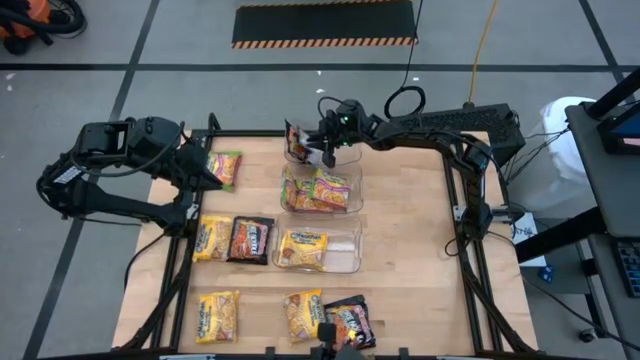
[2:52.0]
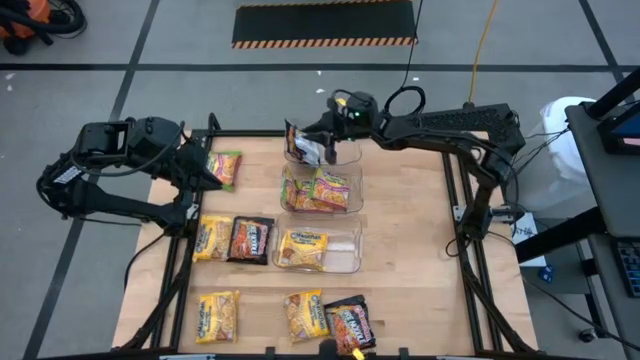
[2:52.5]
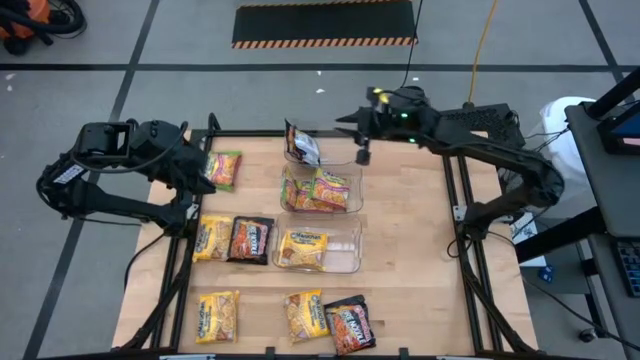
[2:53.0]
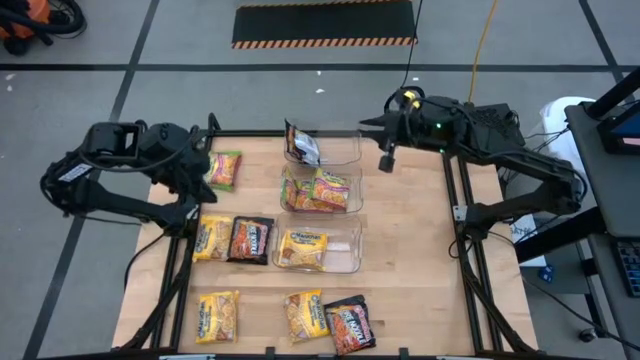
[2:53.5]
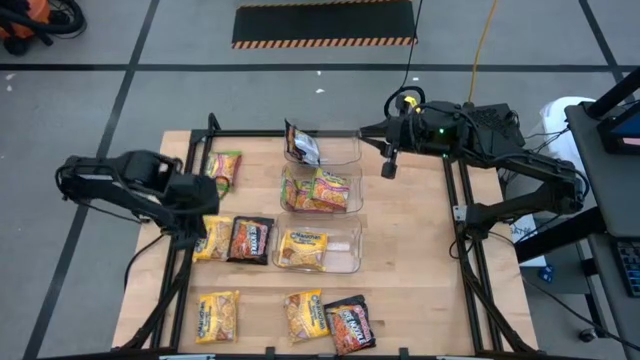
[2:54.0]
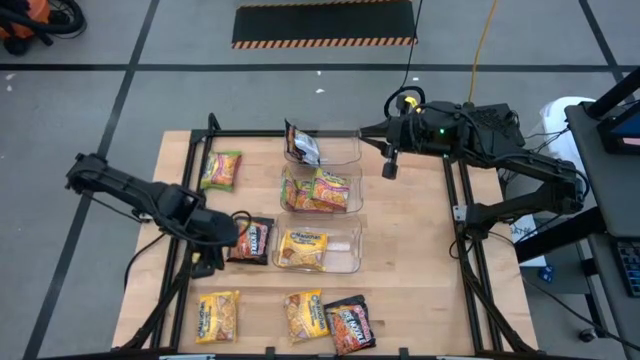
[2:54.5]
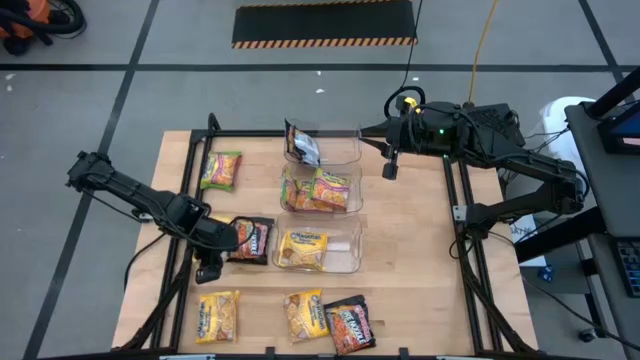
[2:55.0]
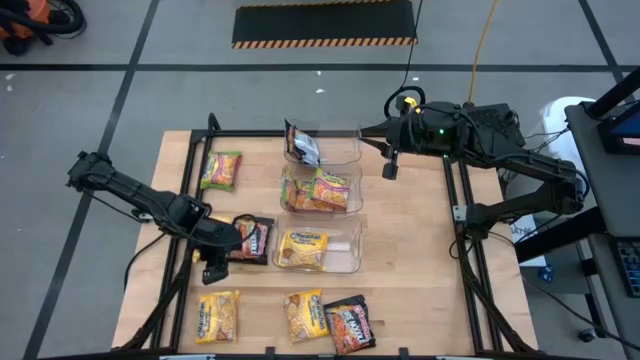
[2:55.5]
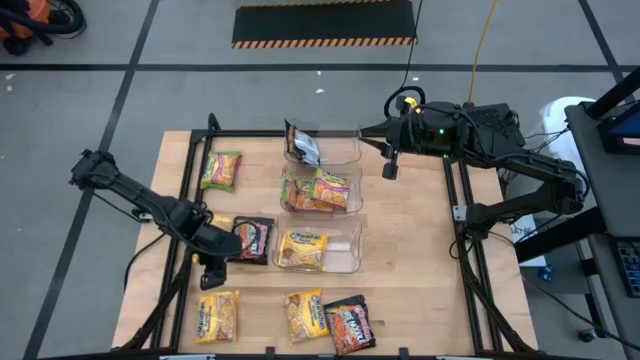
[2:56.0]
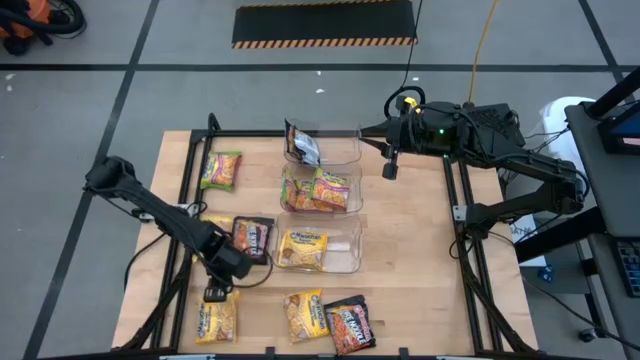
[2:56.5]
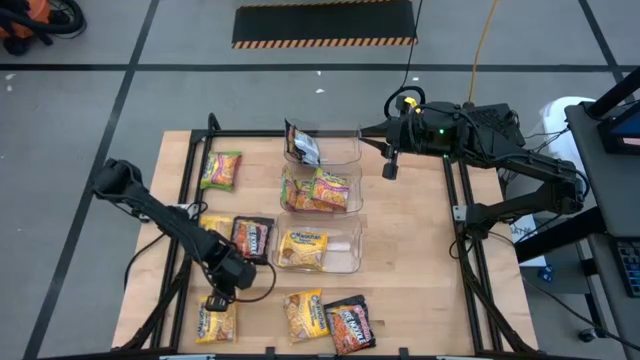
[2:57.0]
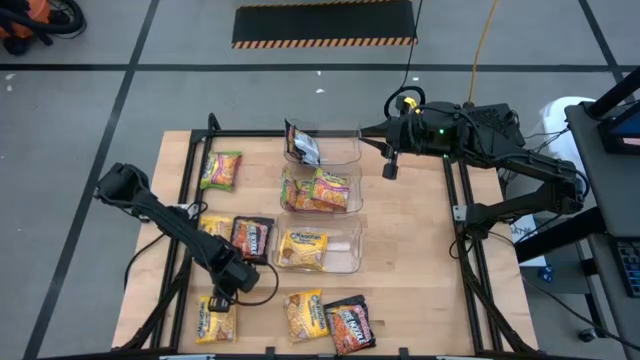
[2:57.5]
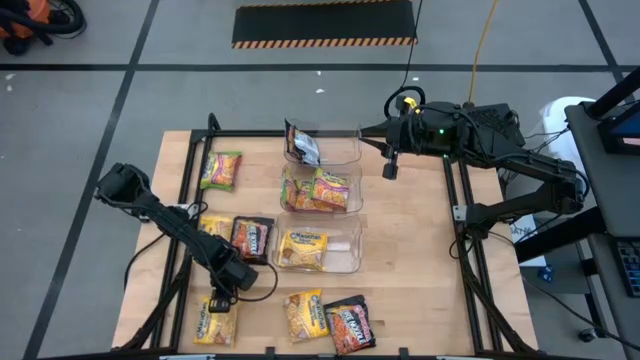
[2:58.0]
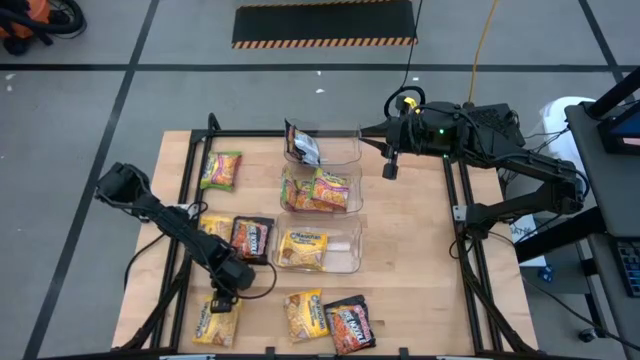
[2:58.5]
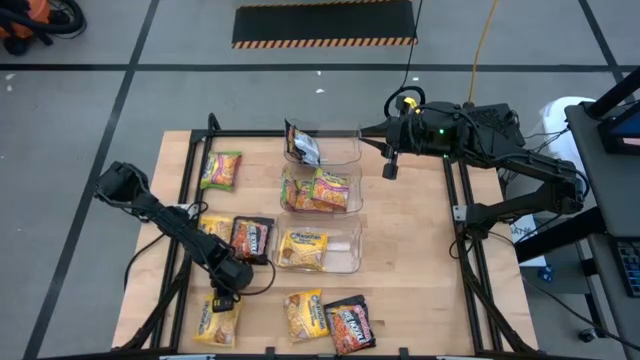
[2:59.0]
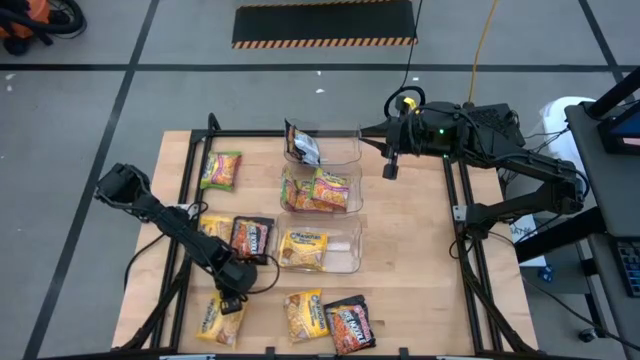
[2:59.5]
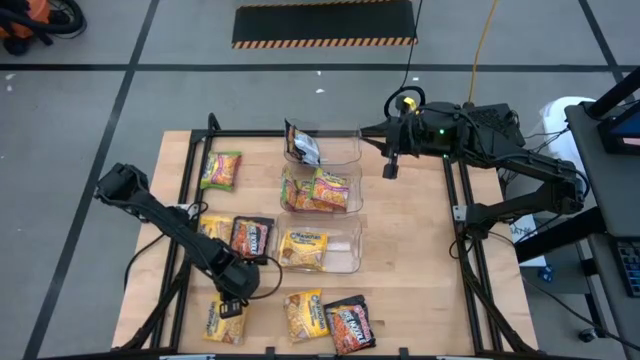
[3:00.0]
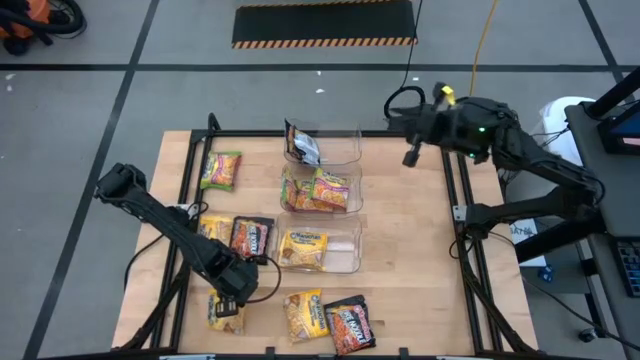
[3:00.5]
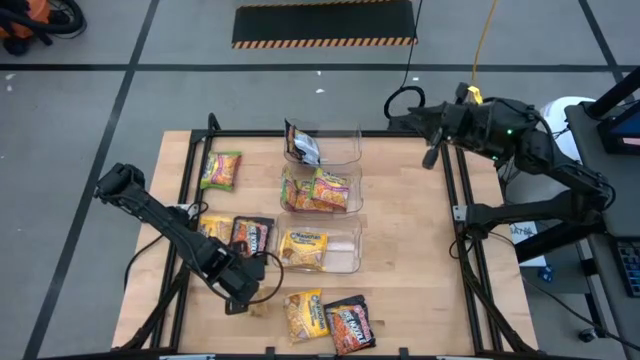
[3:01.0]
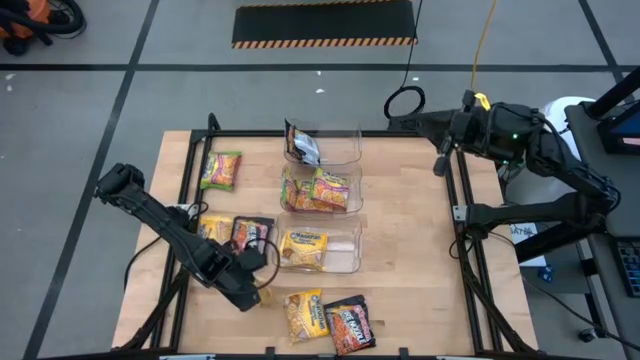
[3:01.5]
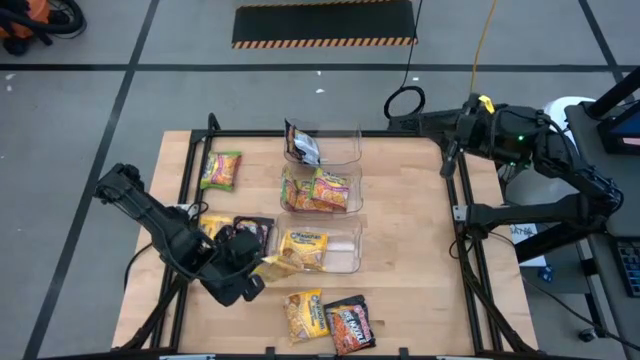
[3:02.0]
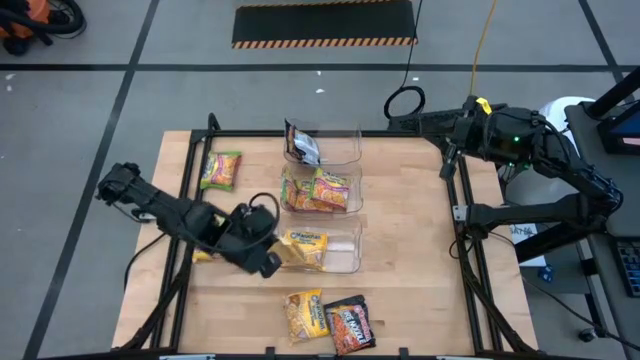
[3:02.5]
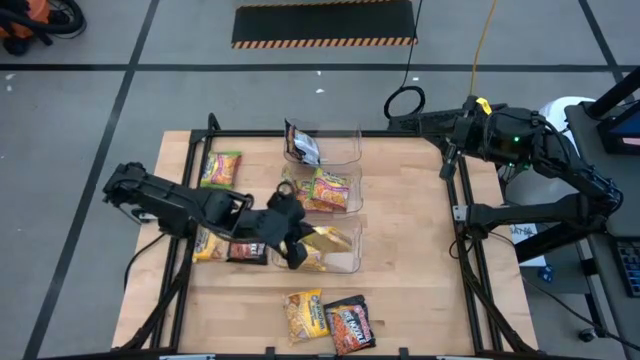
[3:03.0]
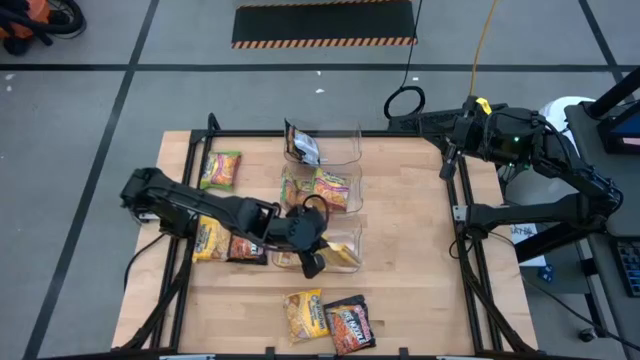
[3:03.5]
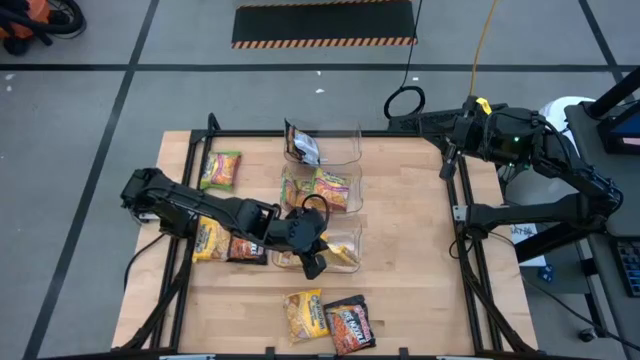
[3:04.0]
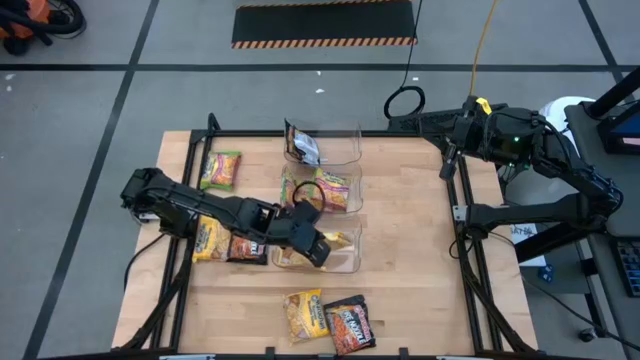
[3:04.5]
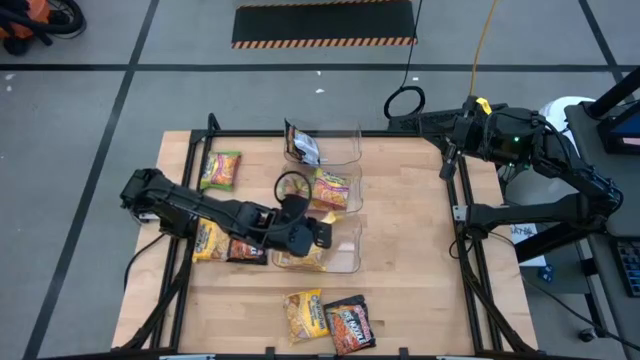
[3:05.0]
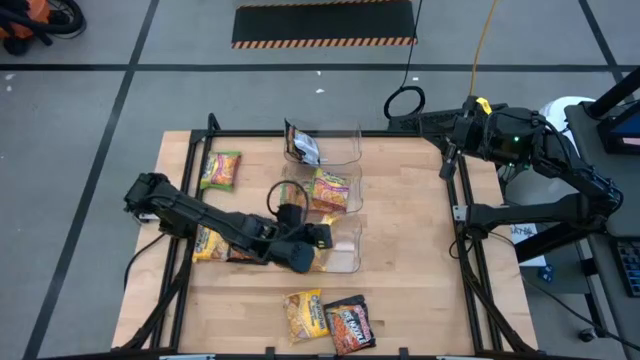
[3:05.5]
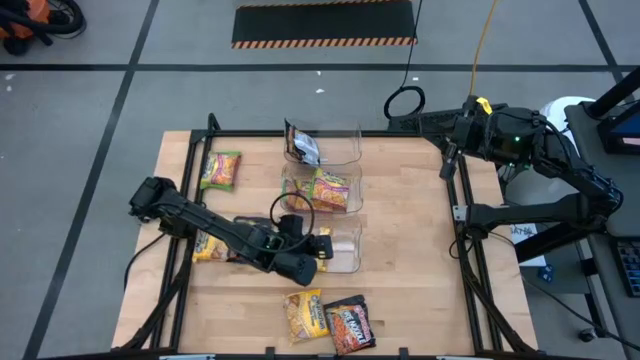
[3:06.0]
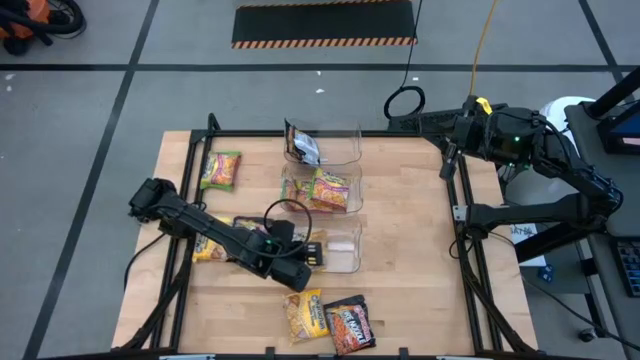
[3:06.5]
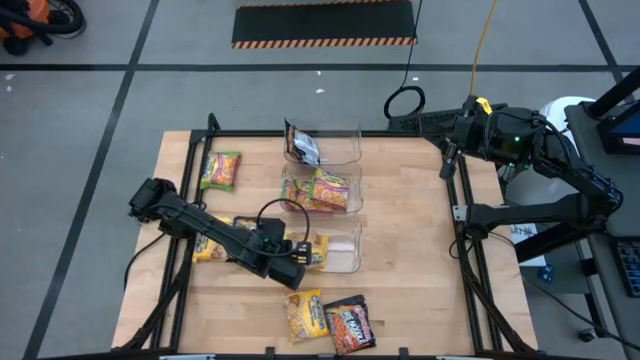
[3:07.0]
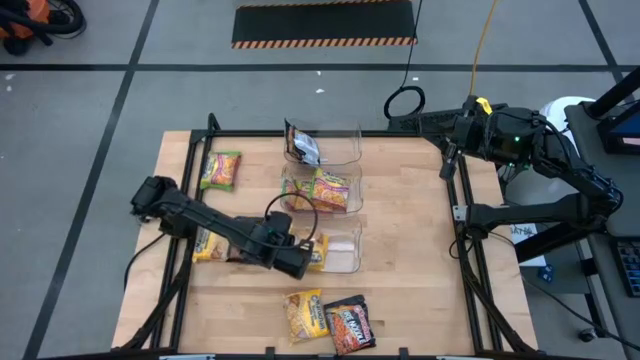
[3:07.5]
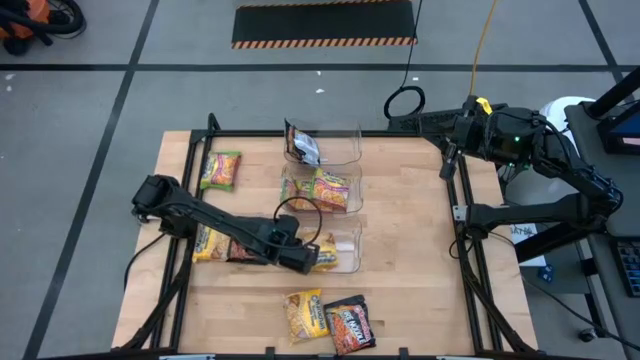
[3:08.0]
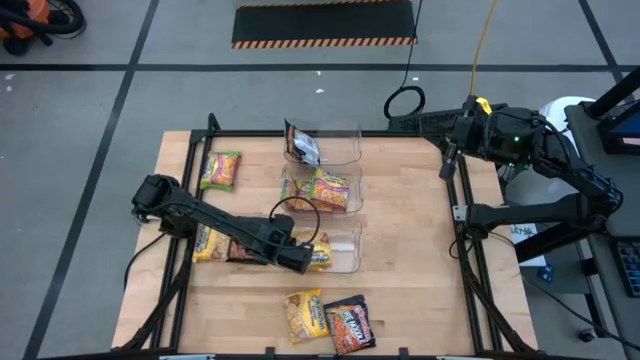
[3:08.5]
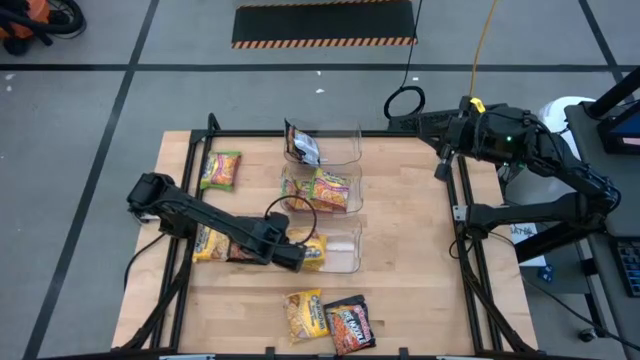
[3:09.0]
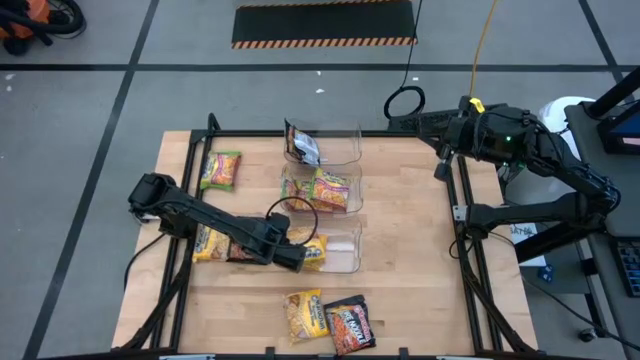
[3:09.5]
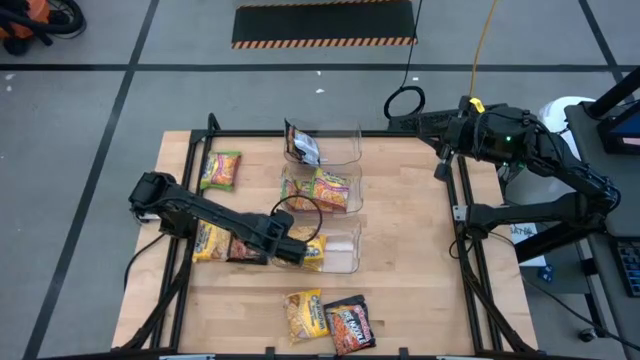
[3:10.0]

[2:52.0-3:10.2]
Task: Sort Maruchan noodles
Put the yellow noodle pack into the bottom transparent bin

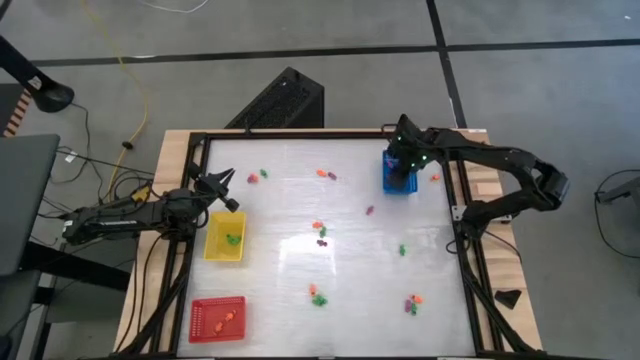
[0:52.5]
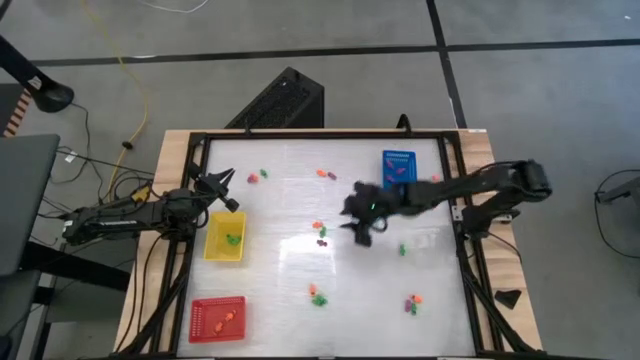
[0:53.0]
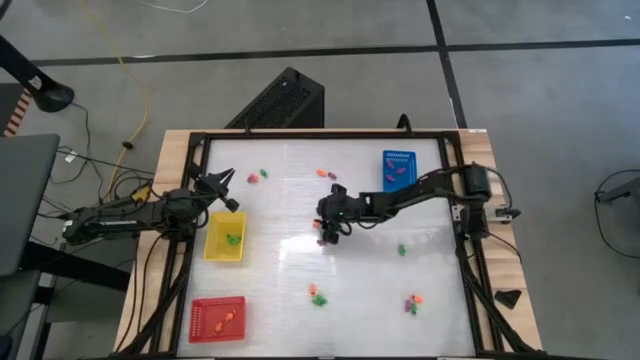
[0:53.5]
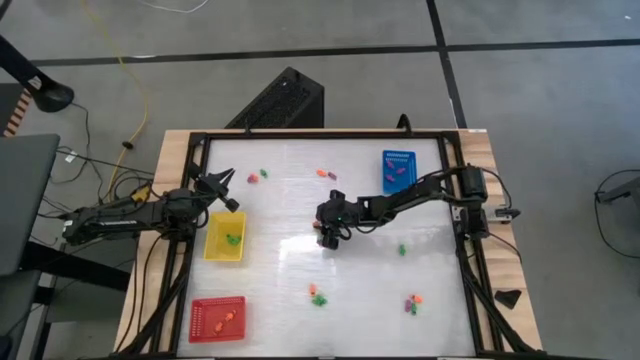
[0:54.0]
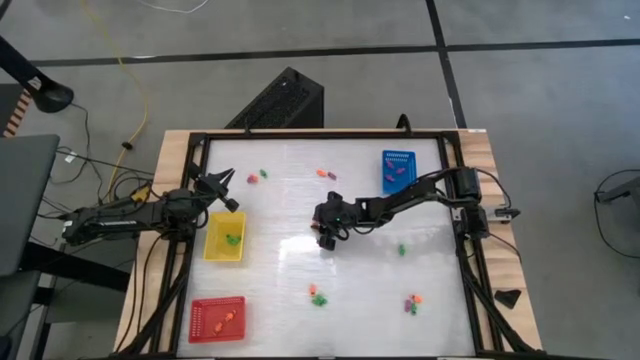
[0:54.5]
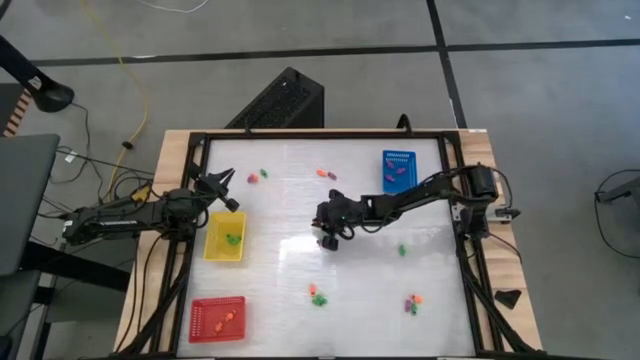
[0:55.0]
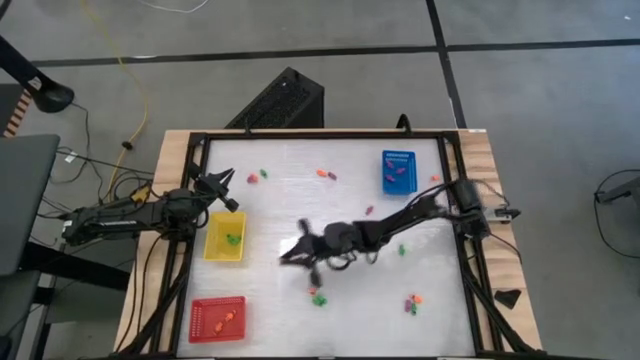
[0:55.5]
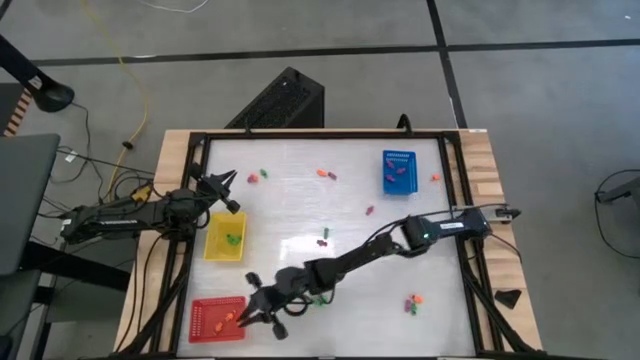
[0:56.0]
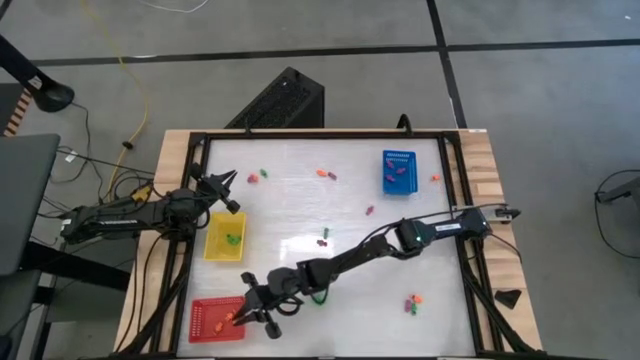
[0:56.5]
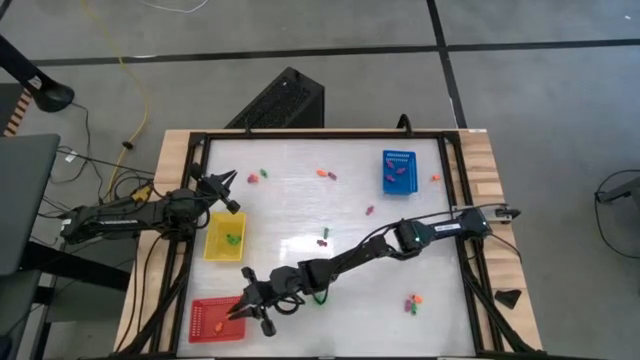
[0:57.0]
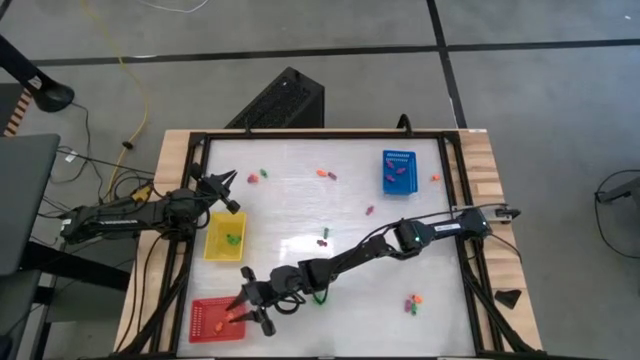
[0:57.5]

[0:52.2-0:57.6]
Task: Sort Halloween decoration
Put the orange skeleton toy into the red bin
